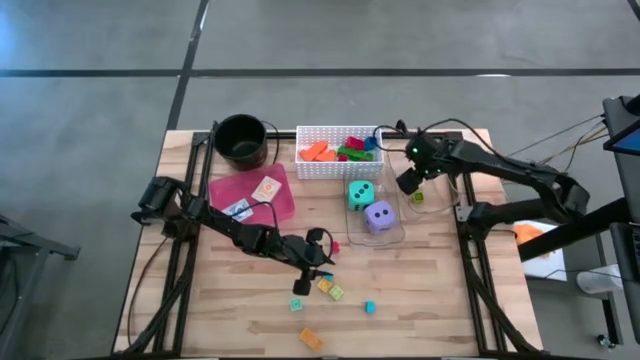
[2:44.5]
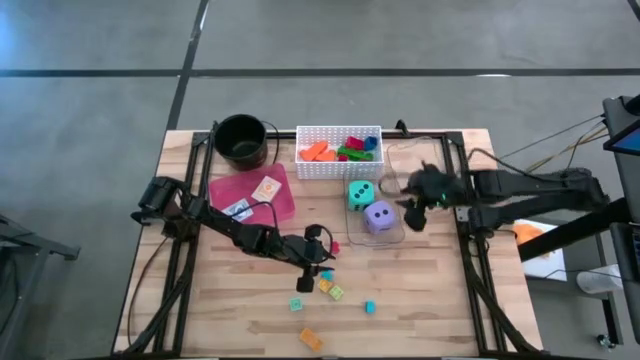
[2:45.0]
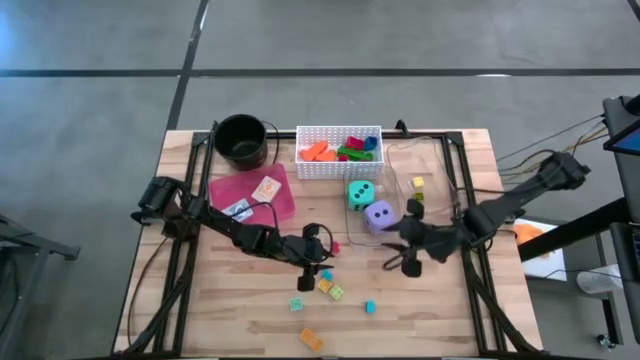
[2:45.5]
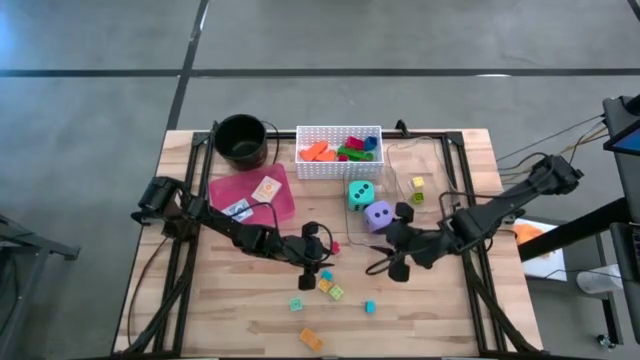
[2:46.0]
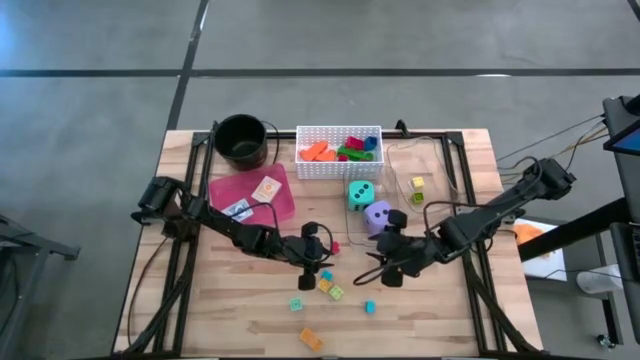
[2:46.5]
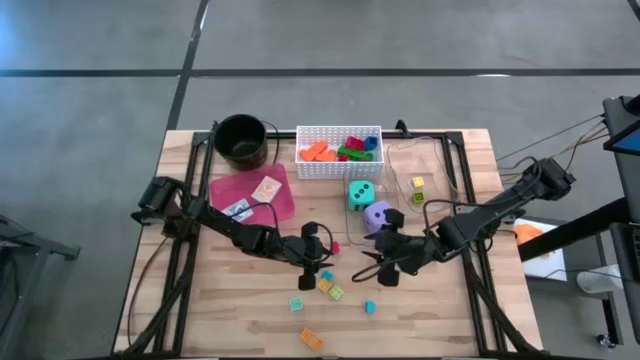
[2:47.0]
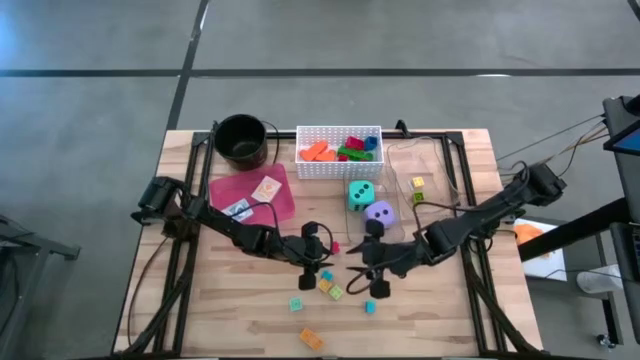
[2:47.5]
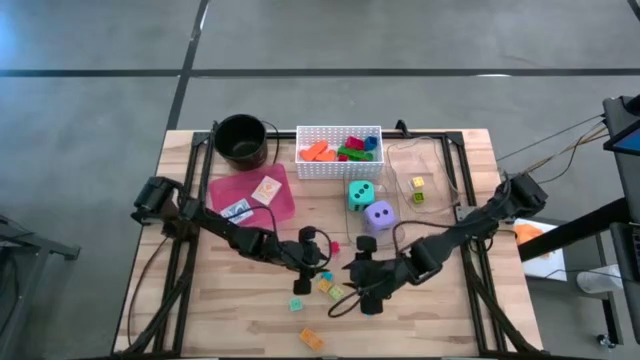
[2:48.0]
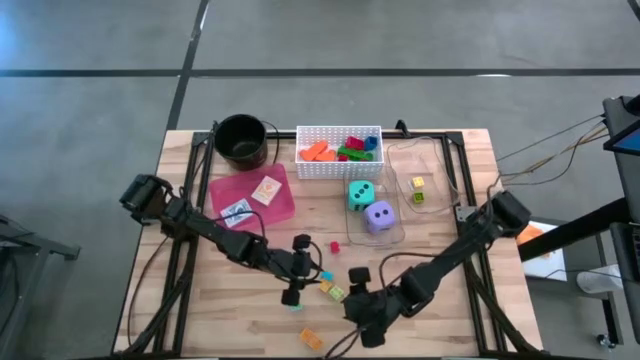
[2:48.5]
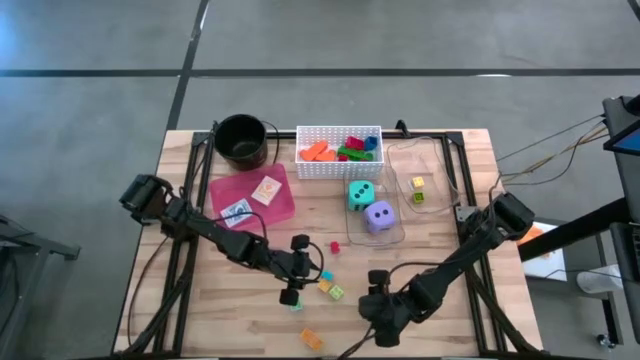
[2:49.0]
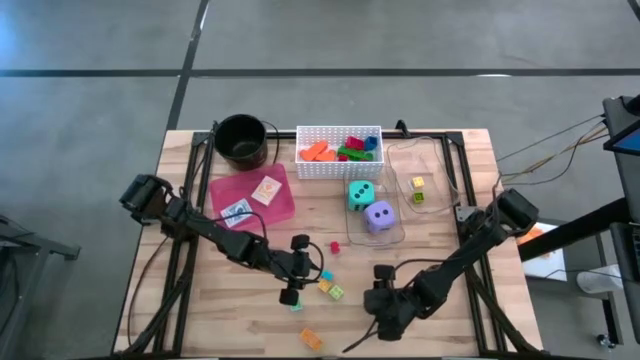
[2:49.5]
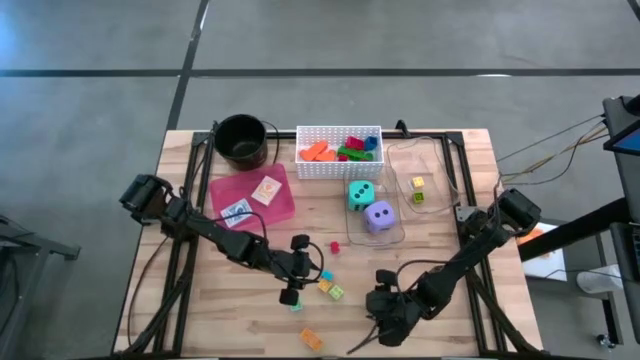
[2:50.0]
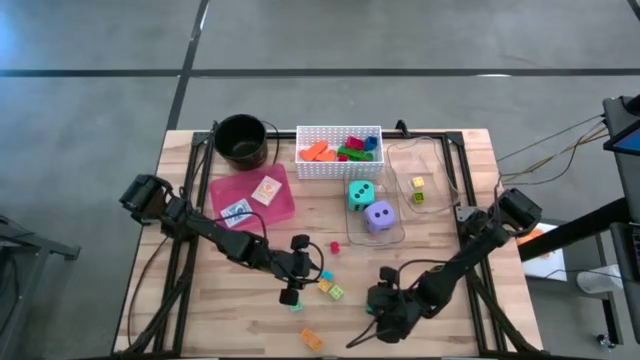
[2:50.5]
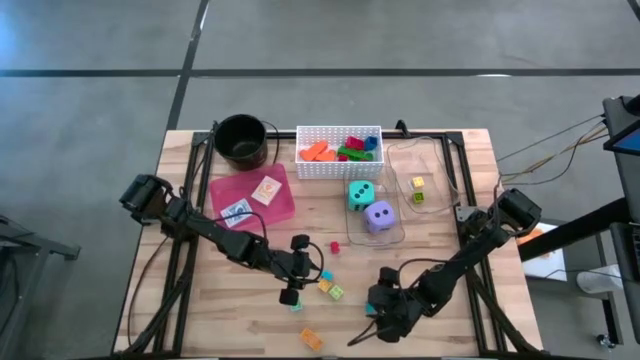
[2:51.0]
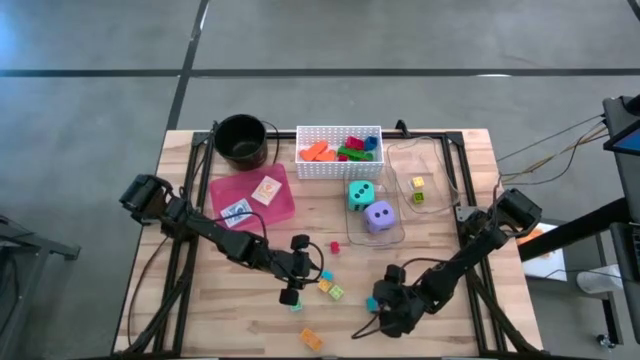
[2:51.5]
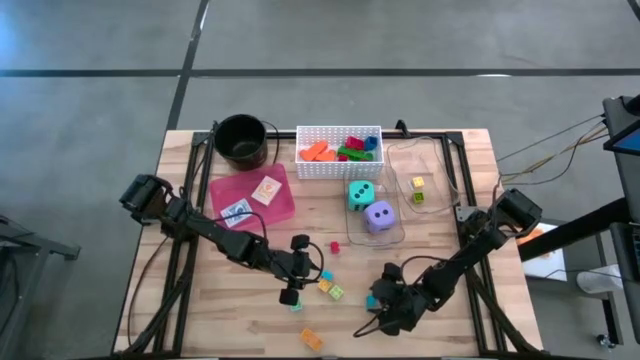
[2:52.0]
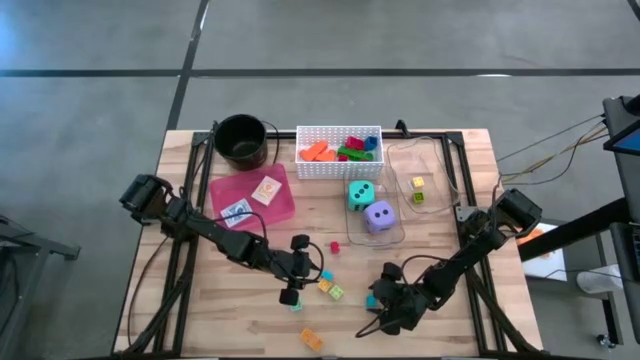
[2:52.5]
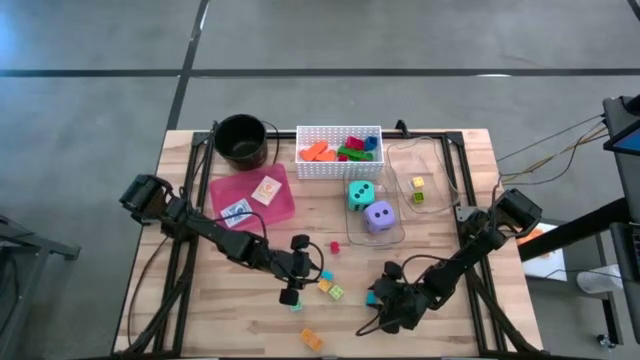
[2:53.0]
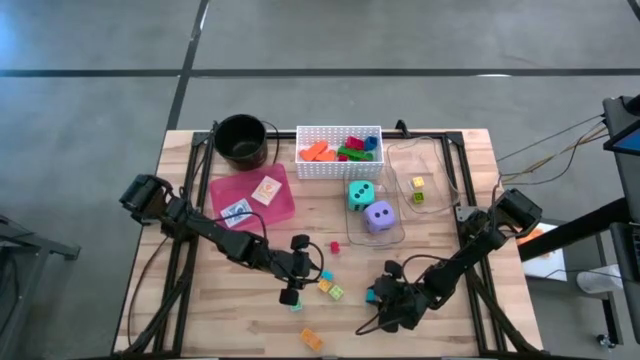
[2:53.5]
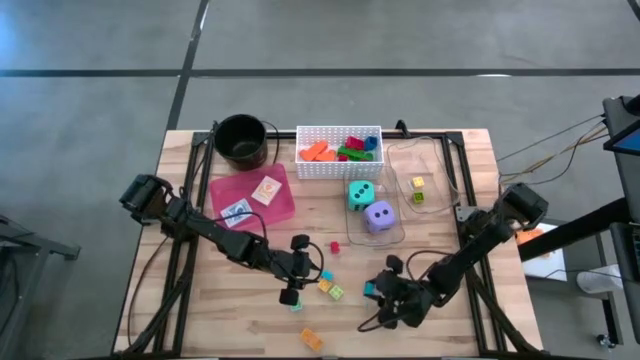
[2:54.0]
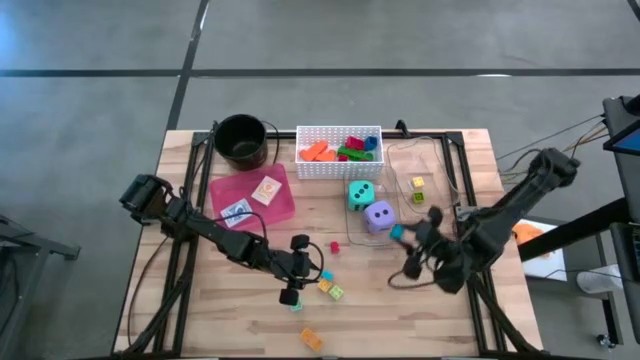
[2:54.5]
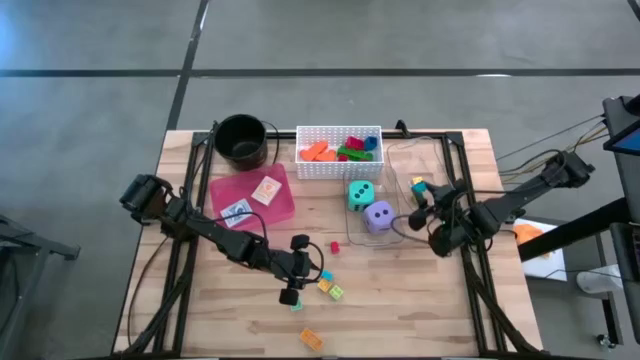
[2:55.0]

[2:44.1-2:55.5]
Task: Pick & Place Toys
Put the right small dark blue game piece into the right transparent bin

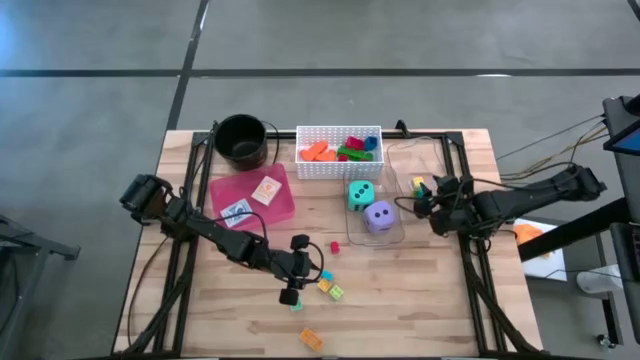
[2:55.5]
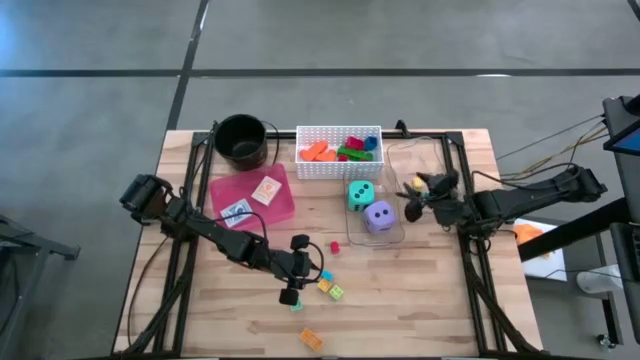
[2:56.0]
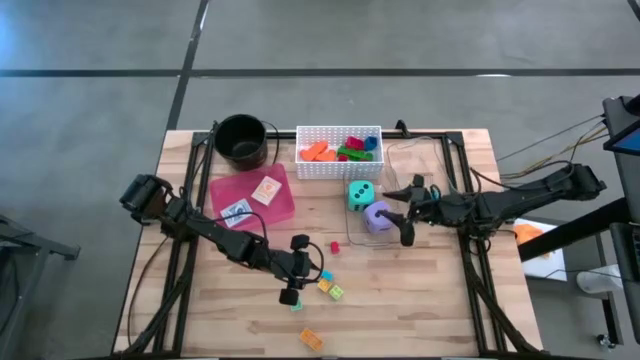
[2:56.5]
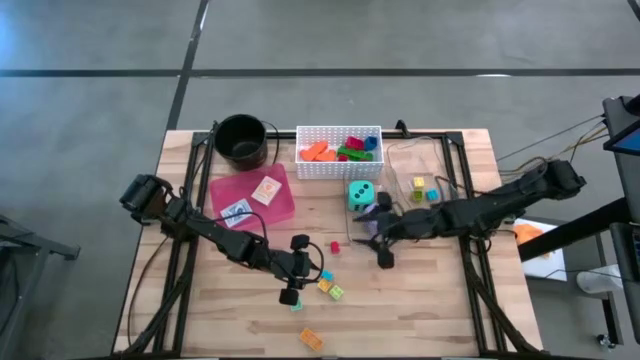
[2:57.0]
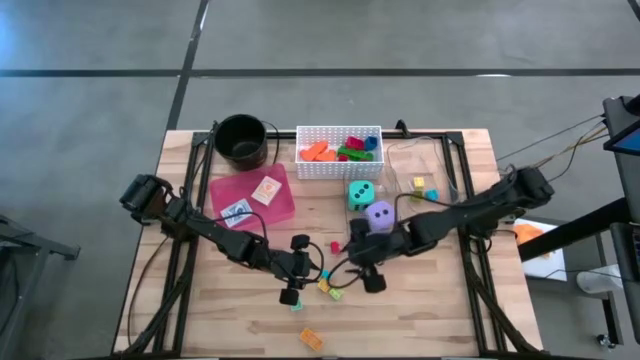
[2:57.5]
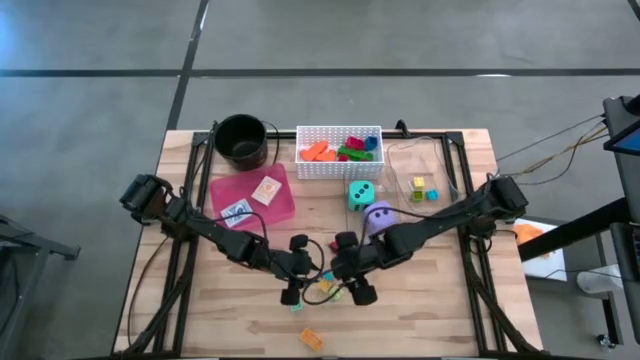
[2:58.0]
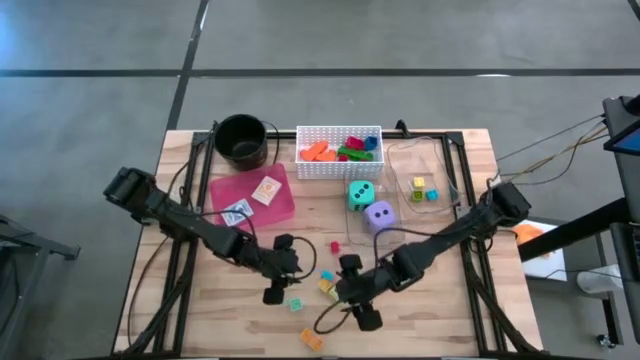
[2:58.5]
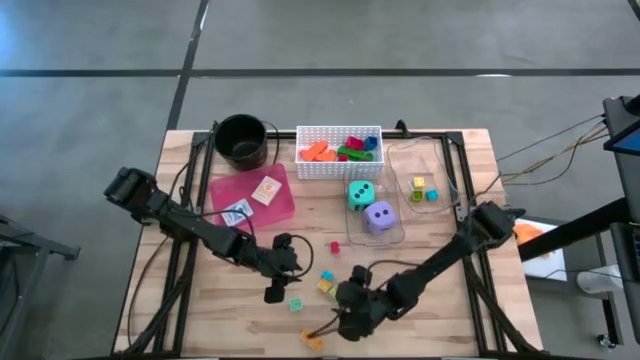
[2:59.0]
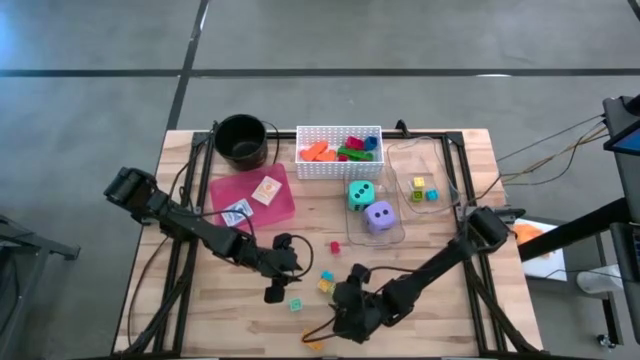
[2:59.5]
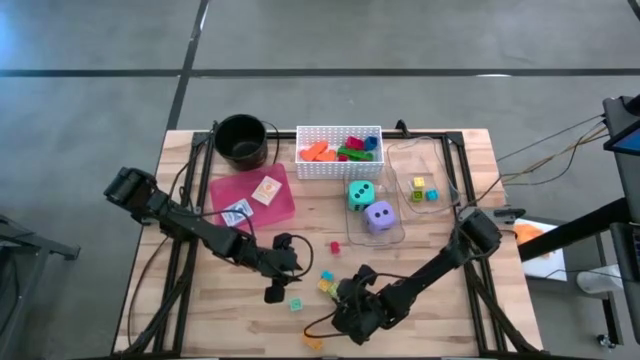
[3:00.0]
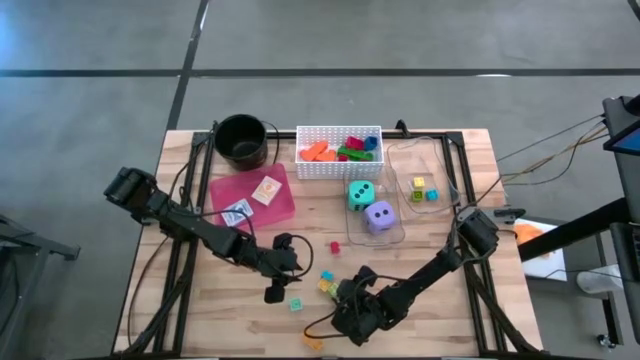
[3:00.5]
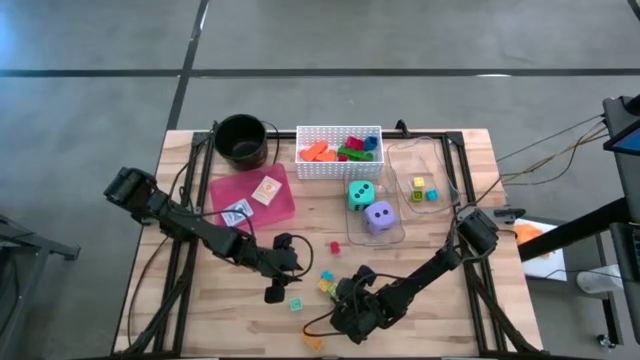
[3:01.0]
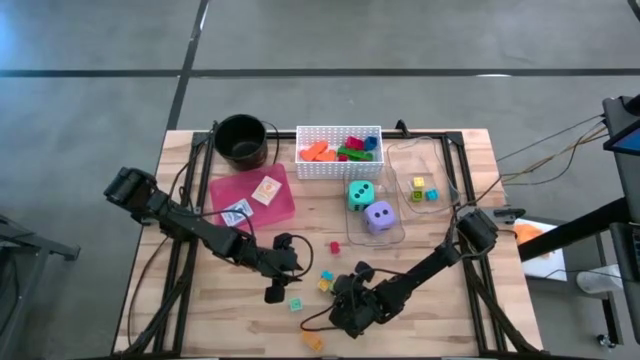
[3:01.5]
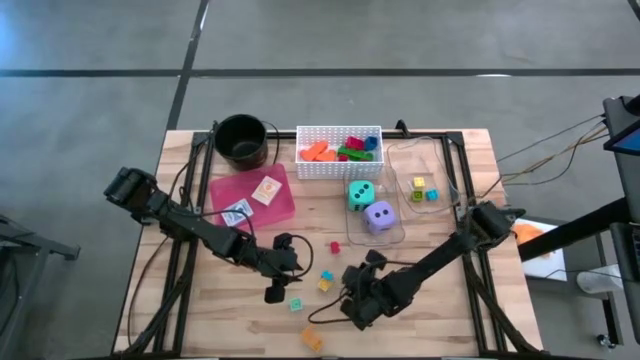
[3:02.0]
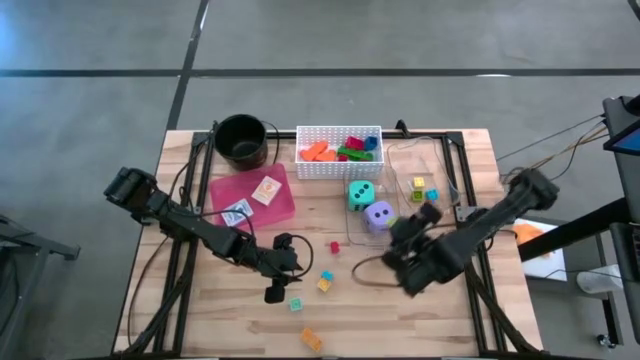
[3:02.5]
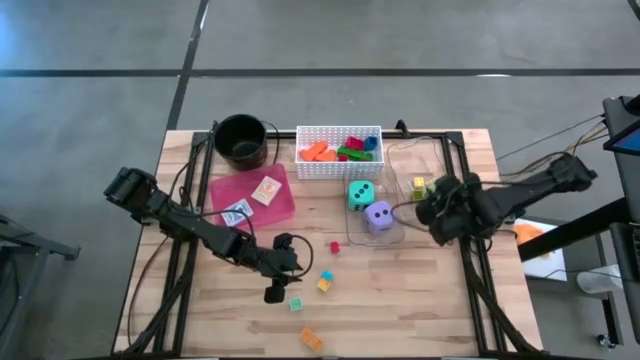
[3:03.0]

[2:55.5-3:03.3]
Put the small light green game piece into the right transparent bin
